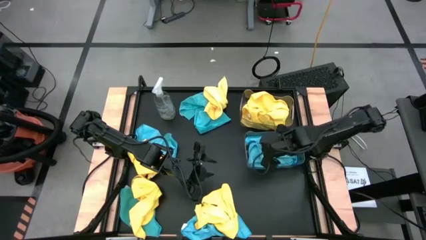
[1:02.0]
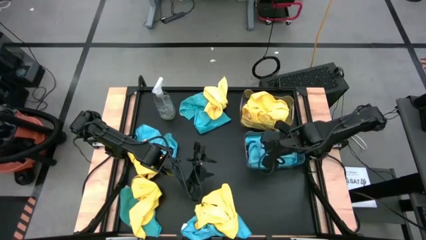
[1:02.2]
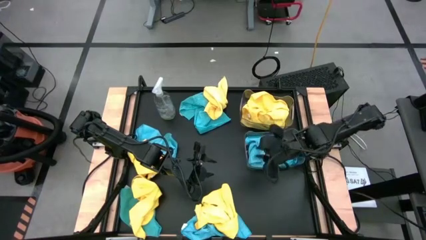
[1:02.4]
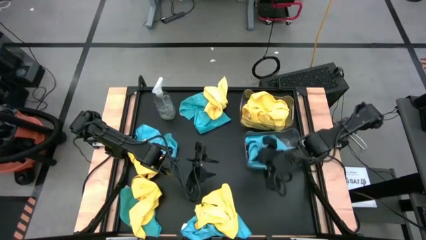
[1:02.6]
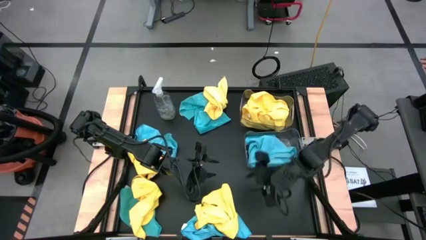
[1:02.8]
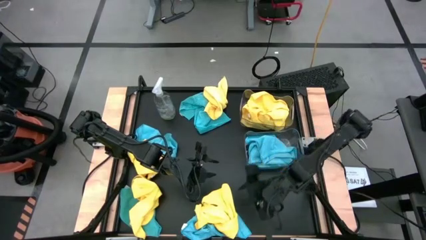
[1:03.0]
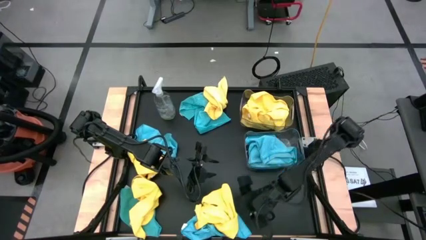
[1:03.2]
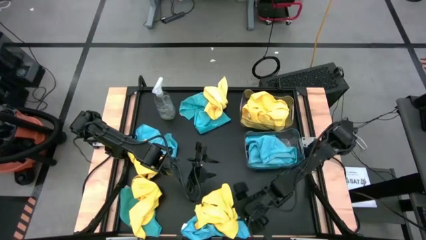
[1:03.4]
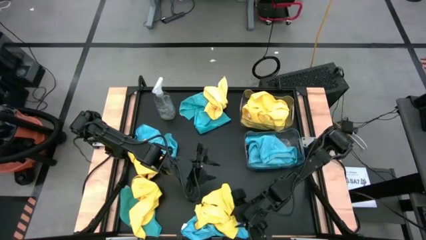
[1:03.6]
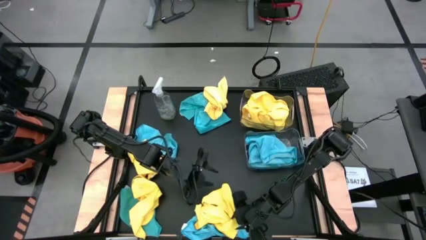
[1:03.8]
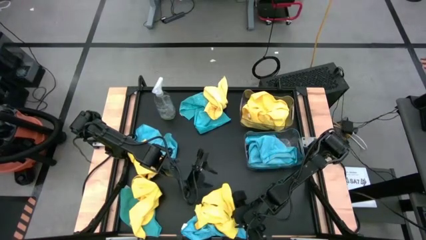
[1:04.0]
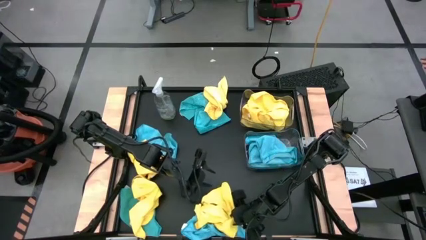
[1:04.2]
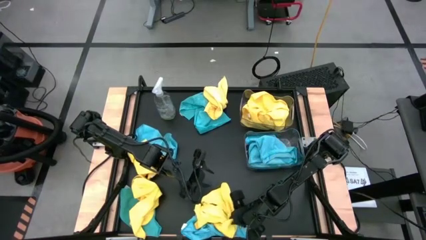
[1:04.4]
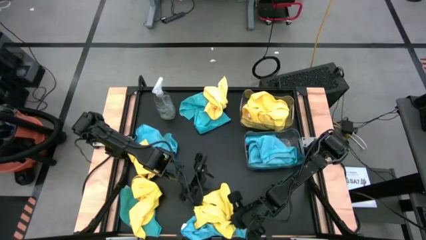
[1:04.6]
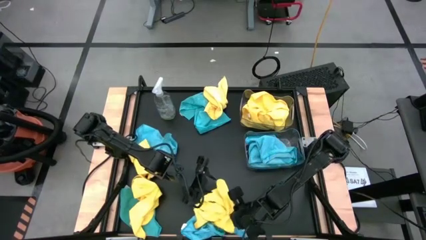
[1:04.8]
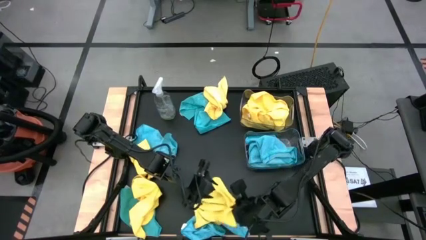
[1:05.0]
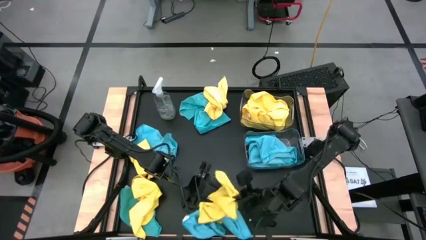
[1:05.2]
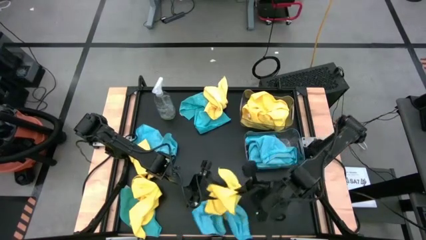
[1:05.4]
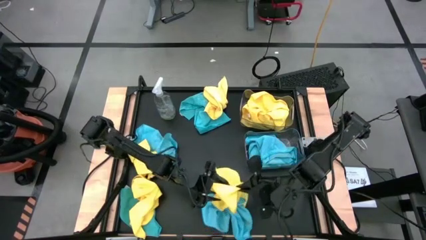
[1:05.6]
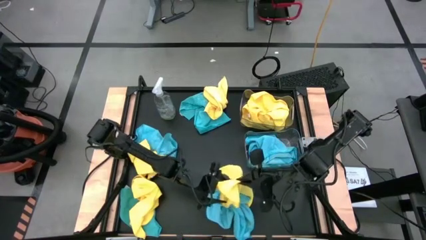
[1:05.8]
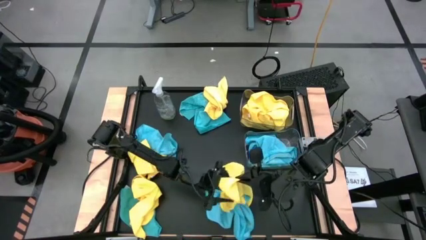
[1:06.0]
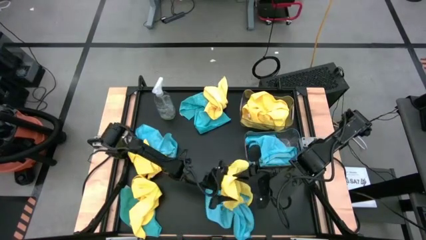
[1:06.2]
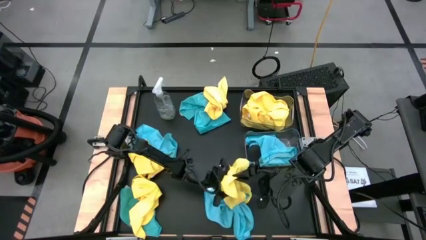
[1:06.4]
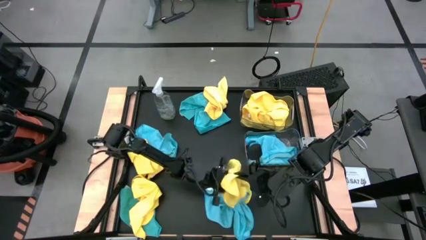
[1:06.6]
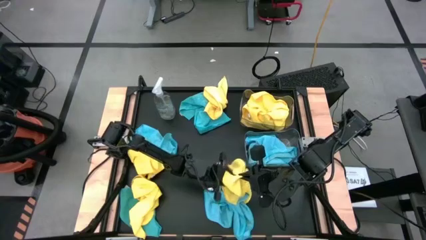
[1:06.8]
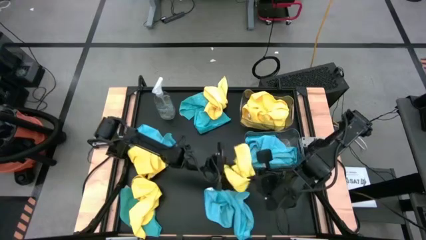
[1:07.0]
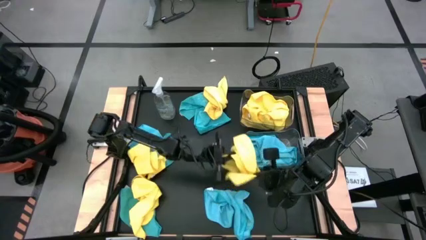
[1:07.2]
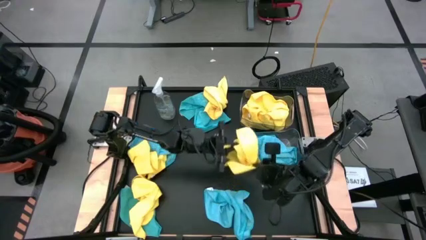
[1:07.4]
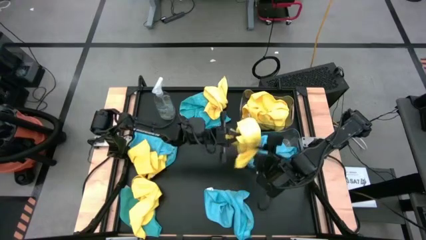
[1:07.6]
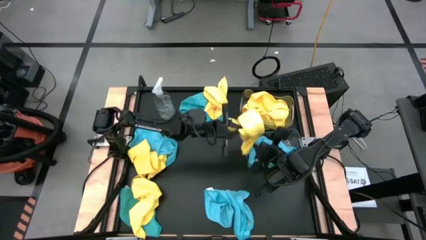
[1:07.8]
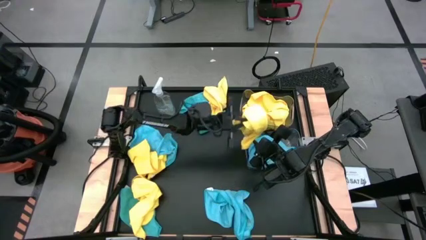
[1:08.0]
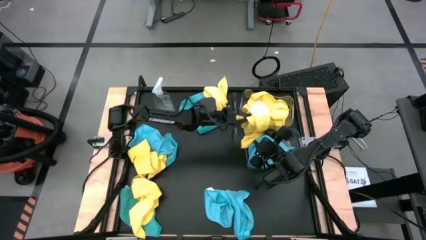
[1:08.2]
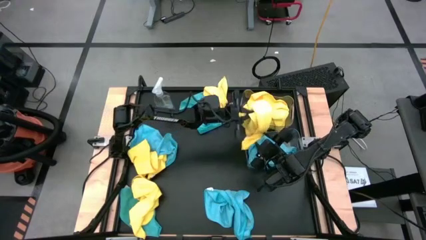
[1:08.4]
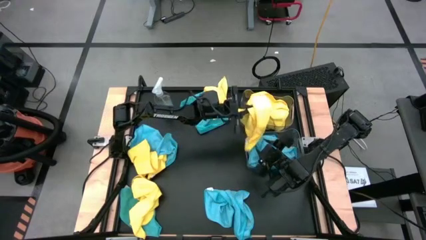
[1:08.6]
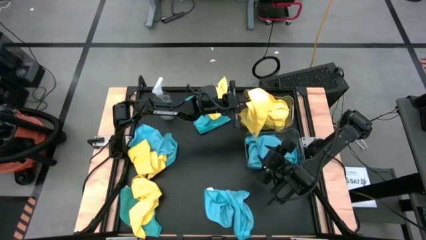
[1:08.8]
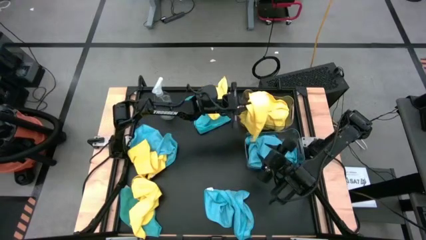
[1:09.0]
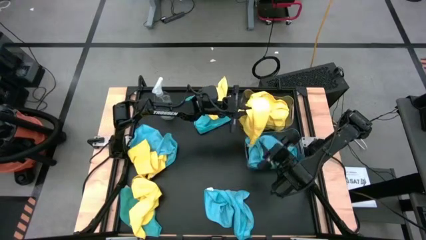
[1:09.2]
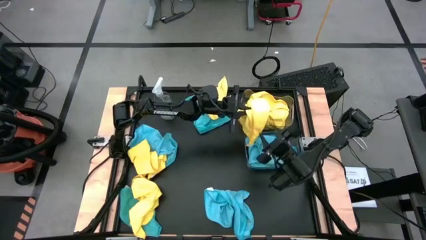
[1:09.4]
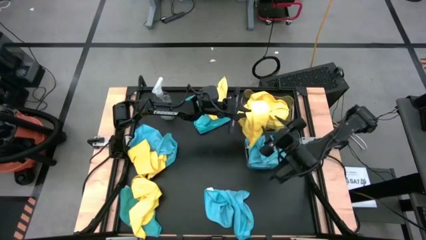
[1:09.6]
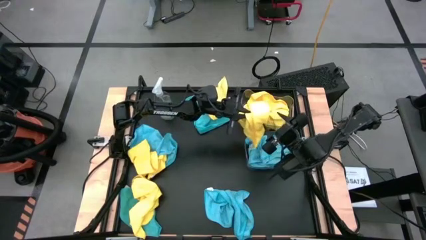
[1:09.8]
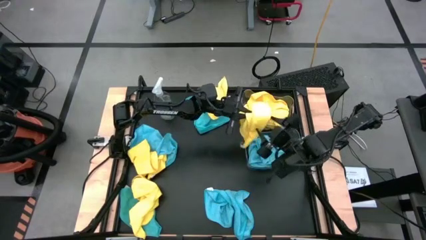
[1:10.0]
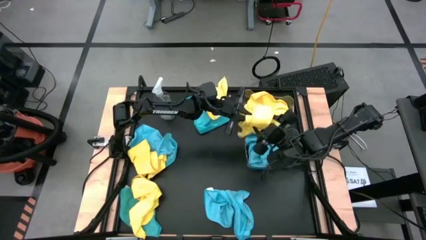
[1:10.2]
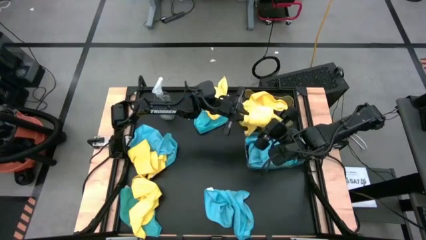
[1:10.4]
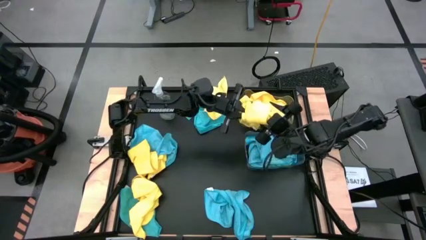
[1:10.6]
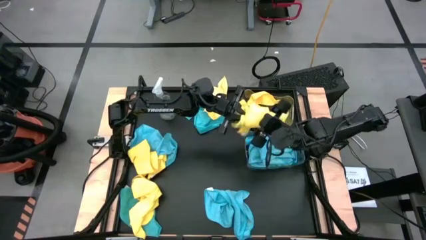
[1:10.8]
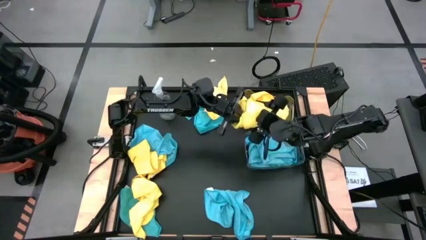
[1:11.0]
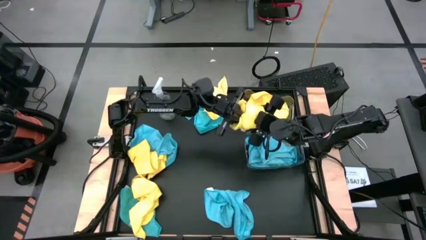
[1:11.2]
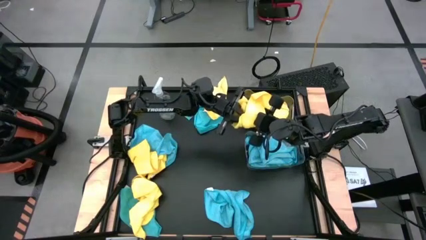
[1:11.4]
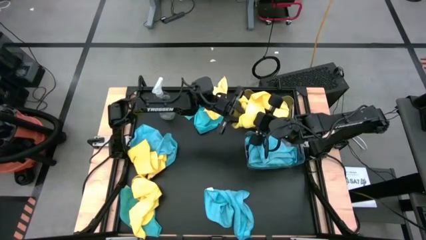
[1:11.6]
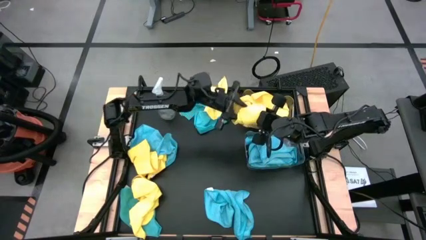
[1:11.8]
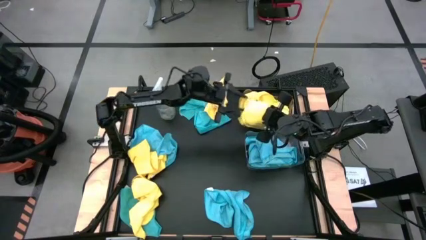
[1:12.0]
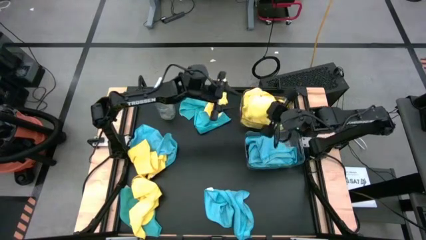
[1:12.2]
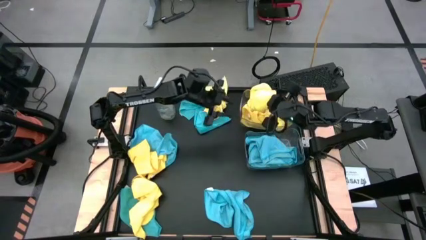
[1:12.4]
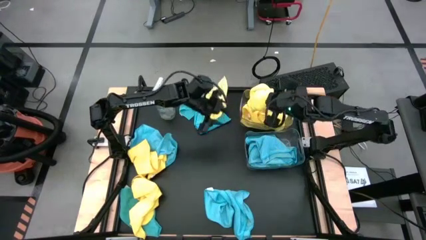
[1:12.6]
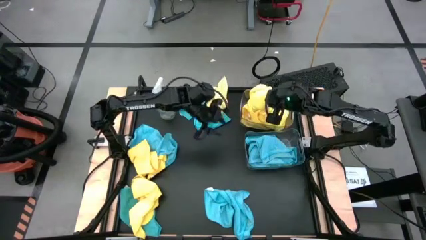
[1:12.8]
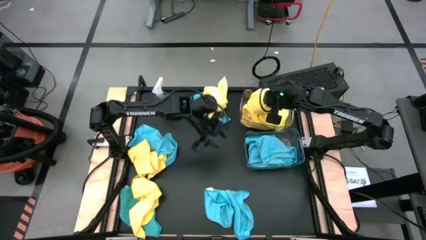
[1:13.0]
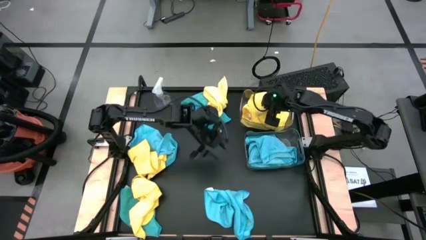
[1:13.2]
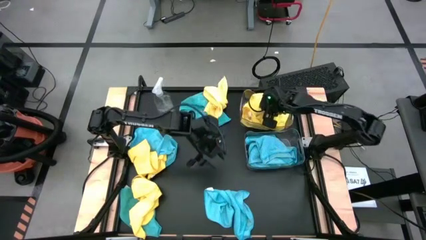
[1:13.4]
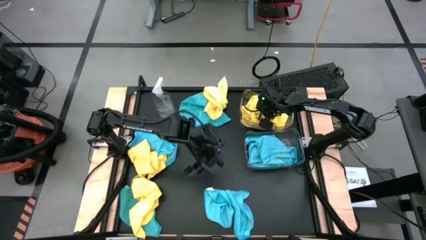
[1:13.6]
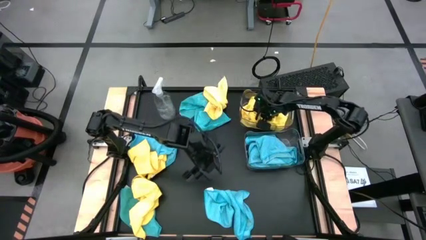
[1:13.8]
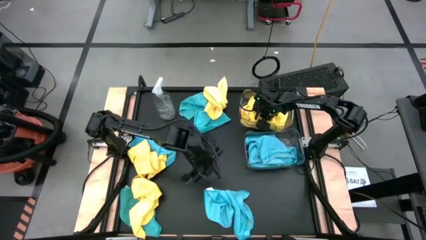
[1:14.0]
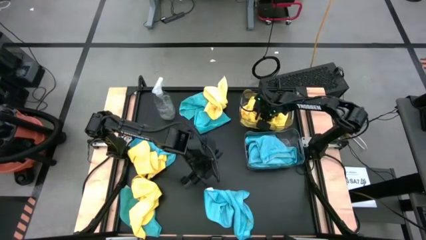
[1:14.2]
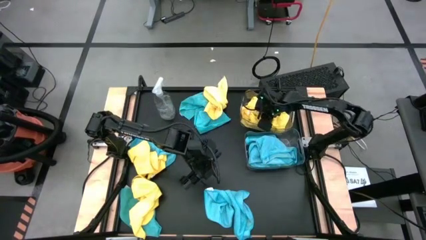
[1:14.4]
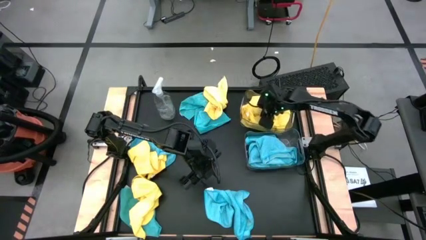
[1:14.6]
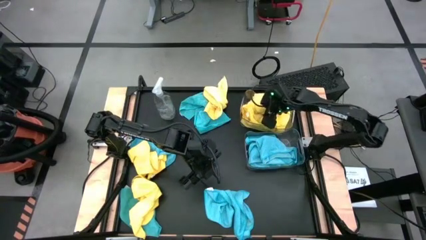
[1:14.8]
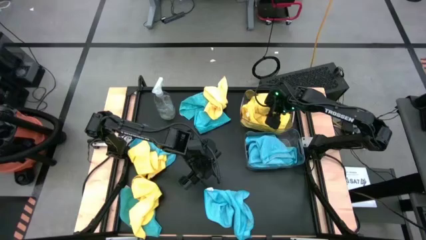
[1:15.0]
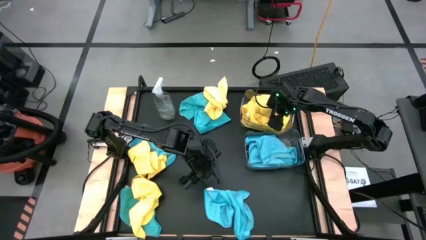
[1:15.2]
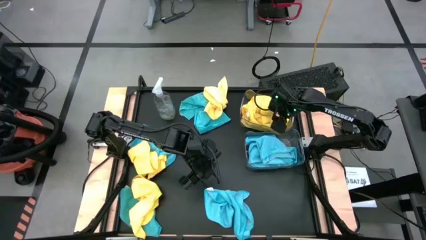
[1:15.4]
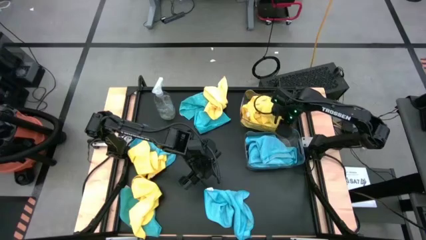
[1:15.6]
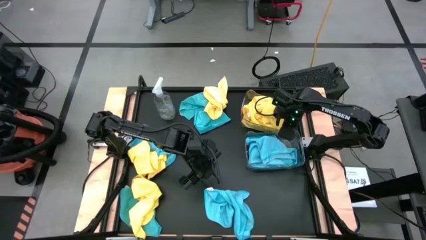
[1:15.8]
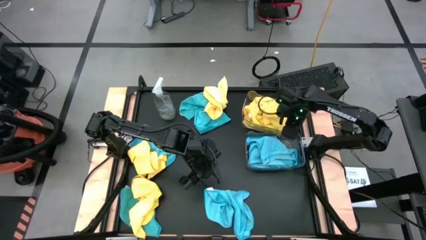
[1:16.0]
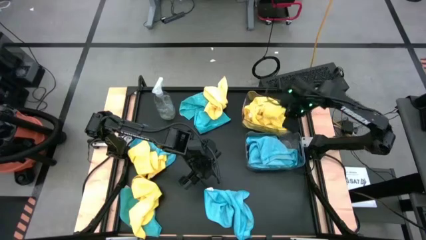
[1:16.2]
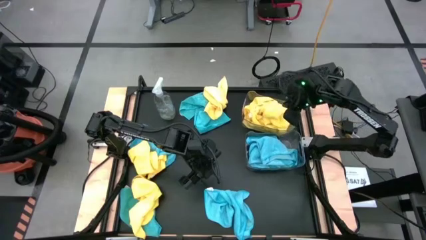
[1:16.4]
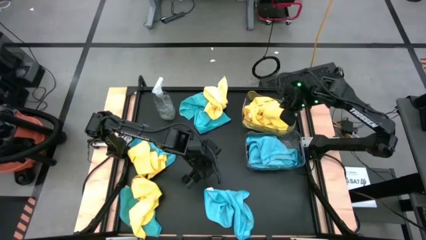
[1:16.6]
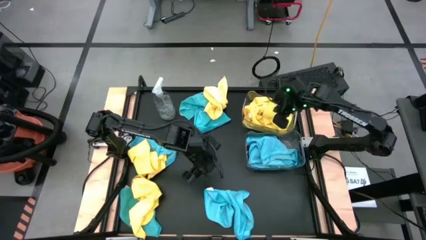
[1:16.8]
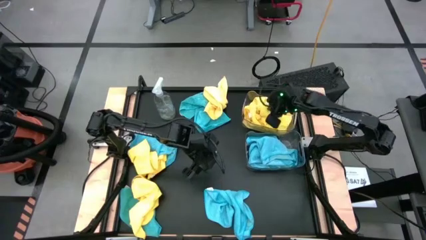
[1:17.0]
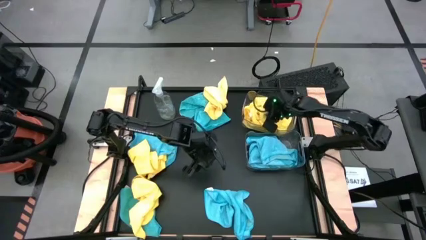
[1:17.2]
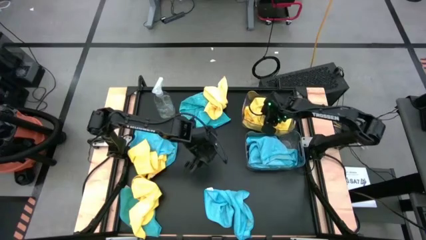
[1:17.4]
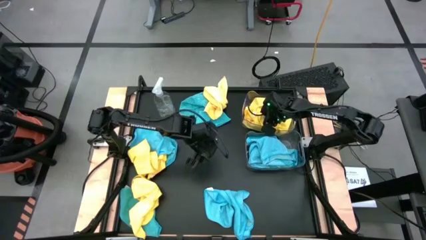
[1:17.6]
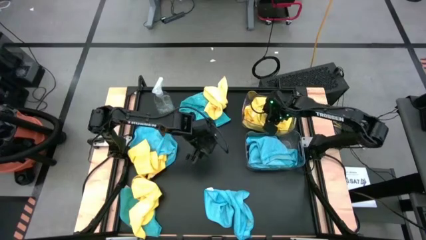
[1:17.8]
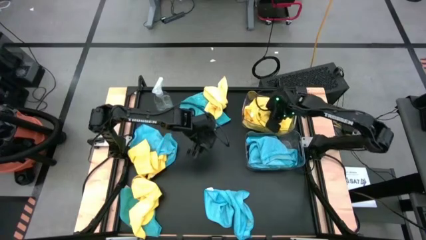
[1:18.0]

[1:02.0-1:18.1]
Task: Sort microfiber towel by color & place in baskets
Put the yellow microfiber towel into the top transparent bin
